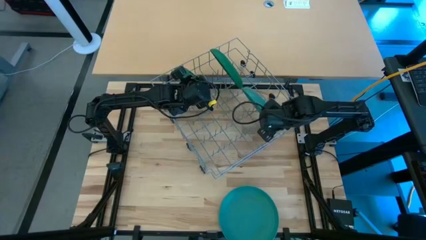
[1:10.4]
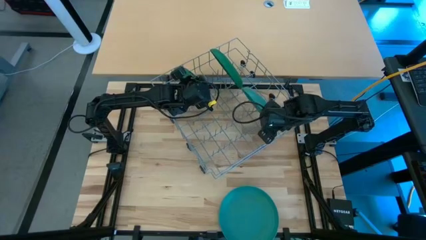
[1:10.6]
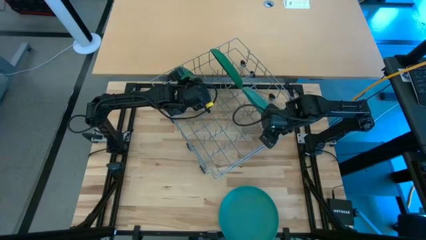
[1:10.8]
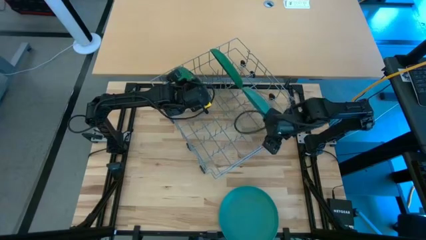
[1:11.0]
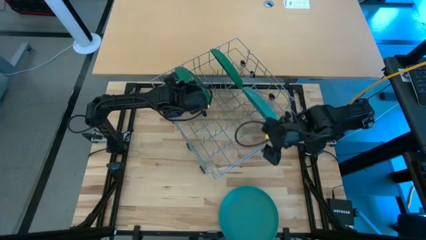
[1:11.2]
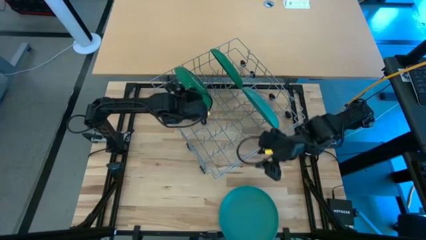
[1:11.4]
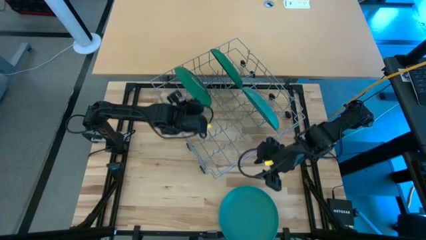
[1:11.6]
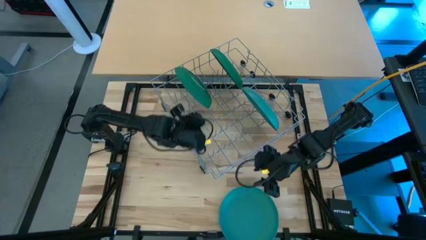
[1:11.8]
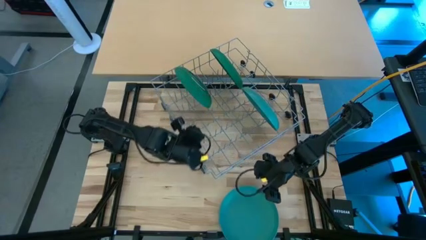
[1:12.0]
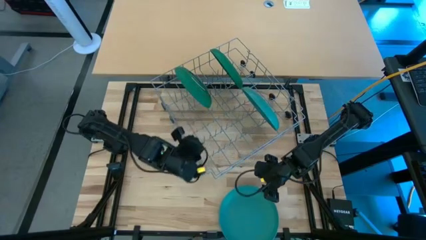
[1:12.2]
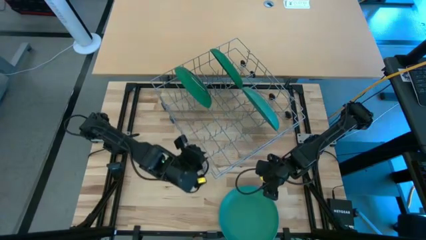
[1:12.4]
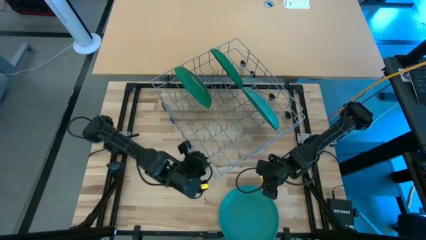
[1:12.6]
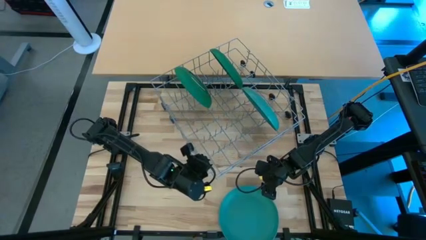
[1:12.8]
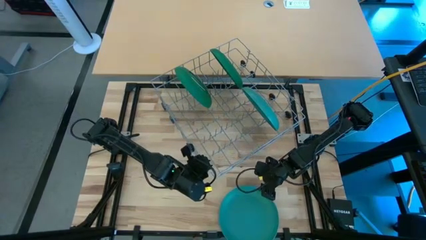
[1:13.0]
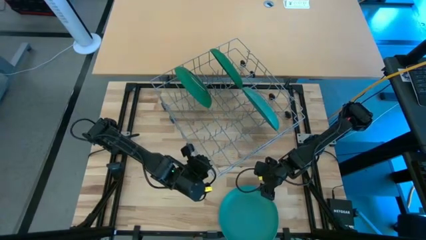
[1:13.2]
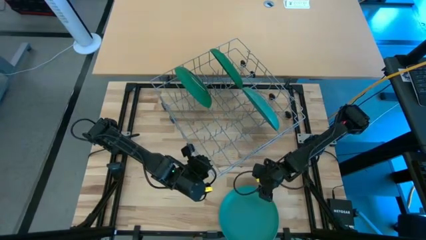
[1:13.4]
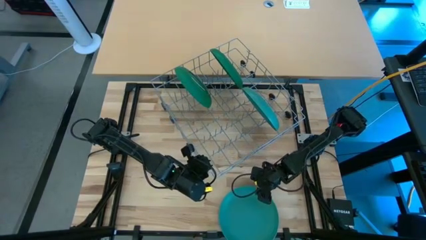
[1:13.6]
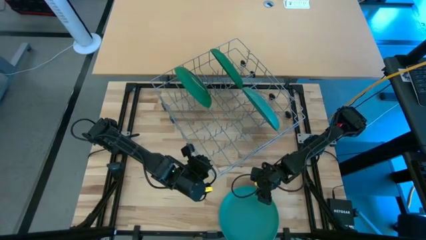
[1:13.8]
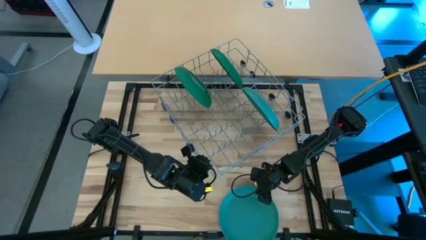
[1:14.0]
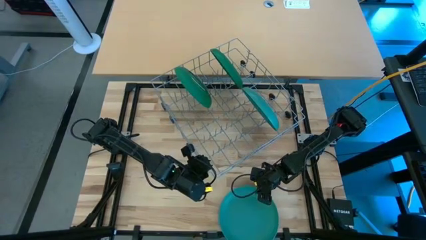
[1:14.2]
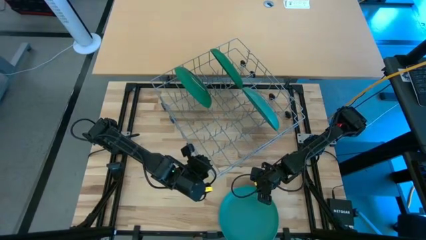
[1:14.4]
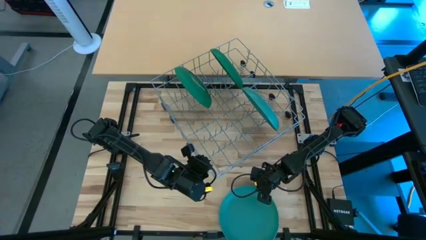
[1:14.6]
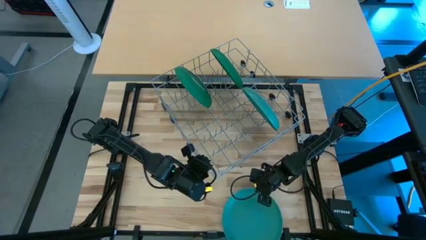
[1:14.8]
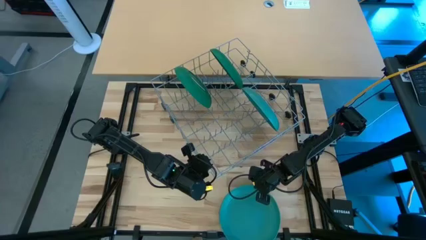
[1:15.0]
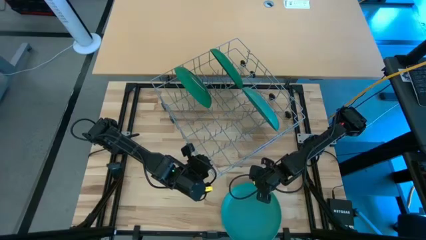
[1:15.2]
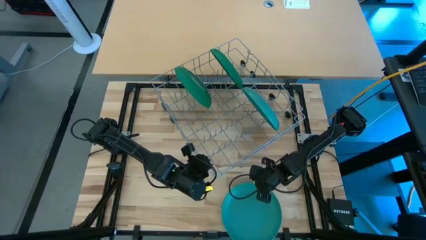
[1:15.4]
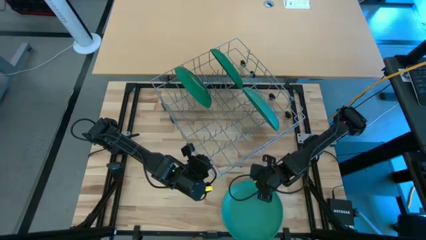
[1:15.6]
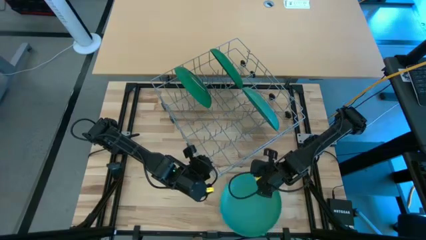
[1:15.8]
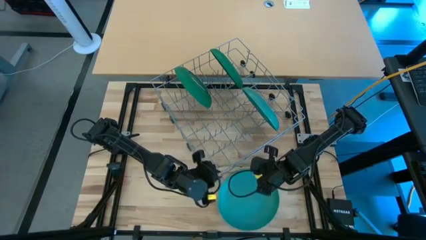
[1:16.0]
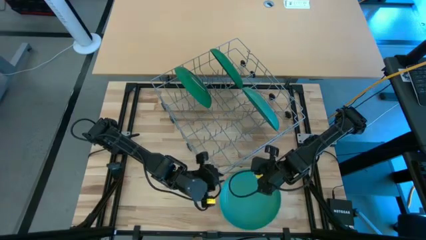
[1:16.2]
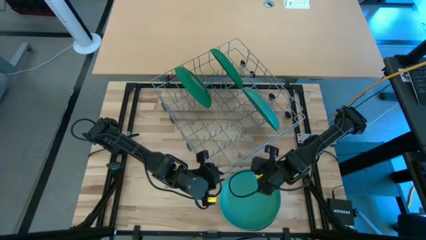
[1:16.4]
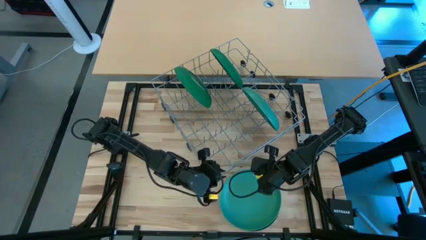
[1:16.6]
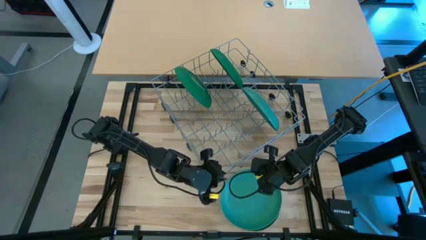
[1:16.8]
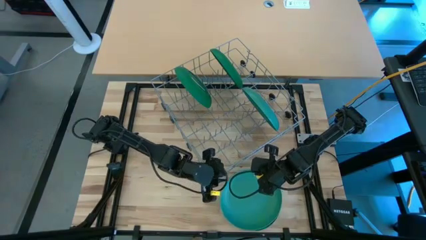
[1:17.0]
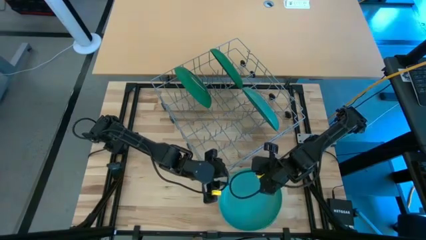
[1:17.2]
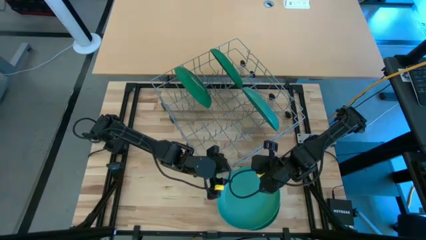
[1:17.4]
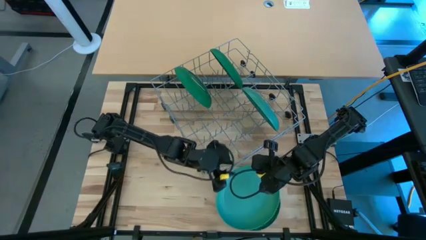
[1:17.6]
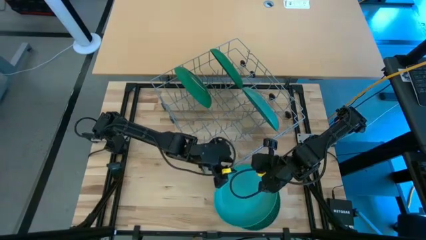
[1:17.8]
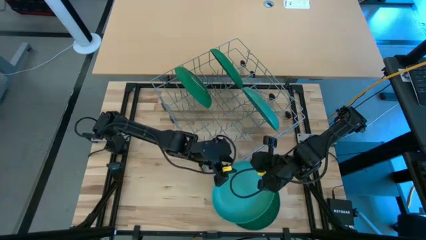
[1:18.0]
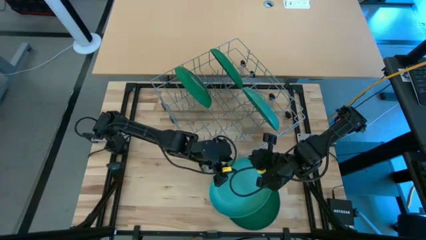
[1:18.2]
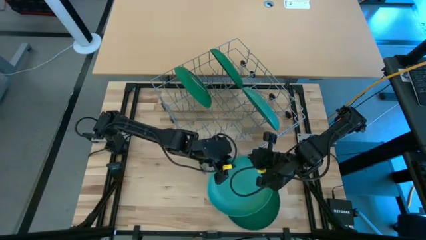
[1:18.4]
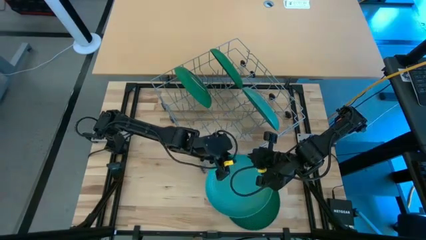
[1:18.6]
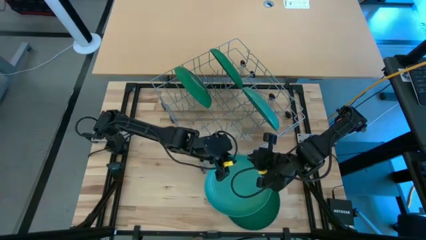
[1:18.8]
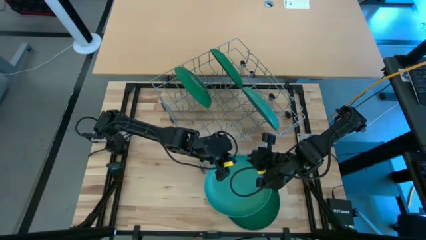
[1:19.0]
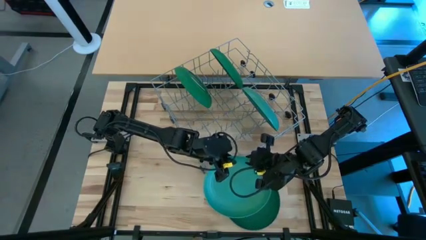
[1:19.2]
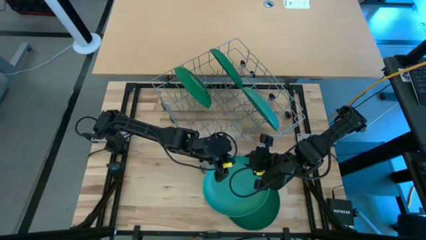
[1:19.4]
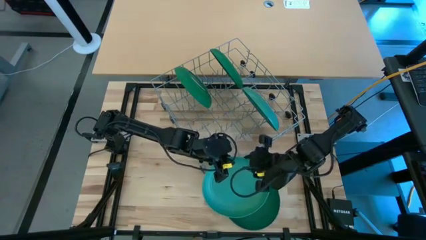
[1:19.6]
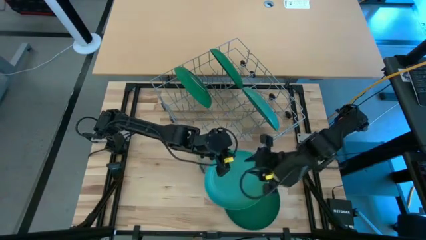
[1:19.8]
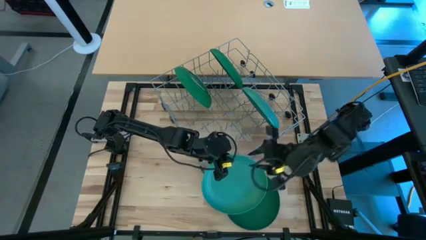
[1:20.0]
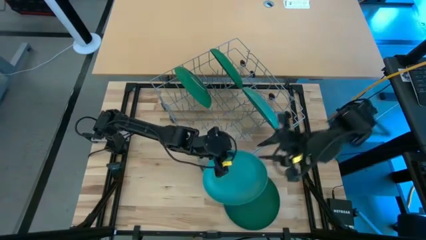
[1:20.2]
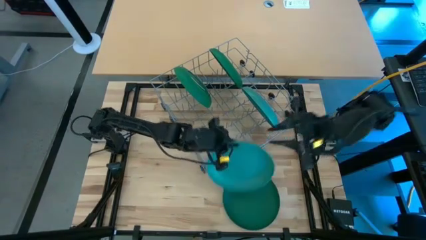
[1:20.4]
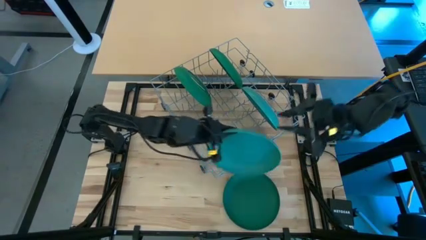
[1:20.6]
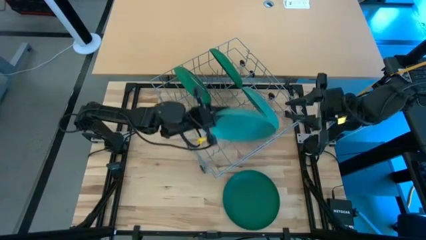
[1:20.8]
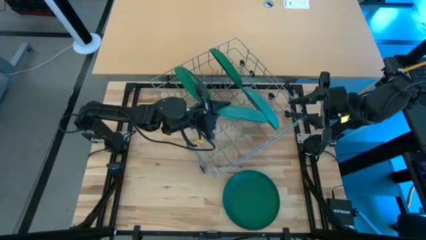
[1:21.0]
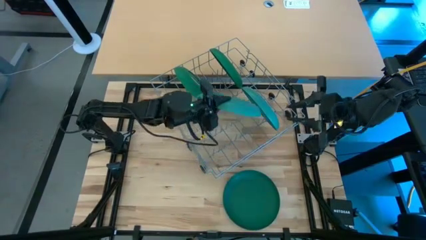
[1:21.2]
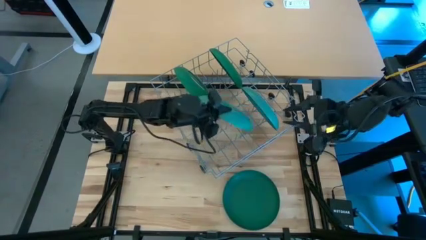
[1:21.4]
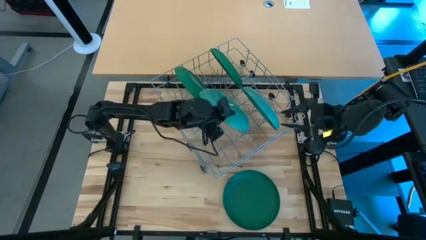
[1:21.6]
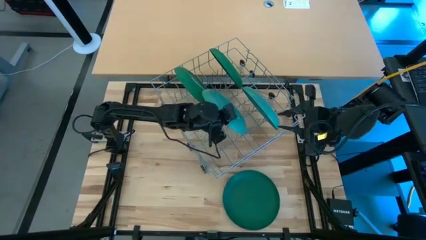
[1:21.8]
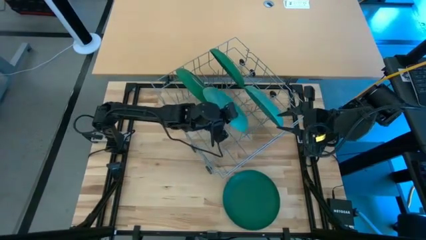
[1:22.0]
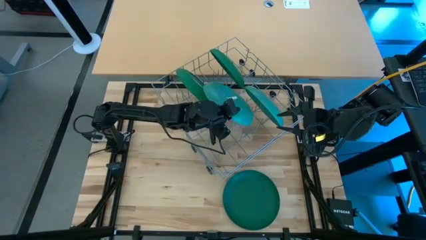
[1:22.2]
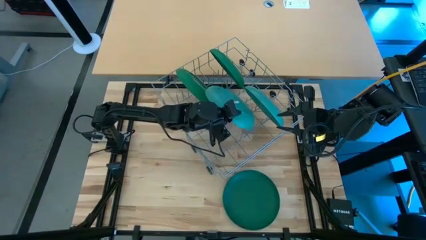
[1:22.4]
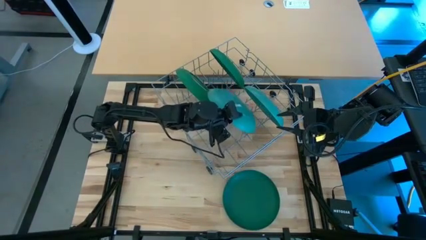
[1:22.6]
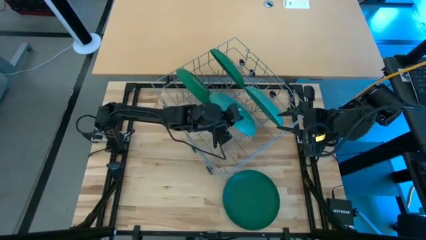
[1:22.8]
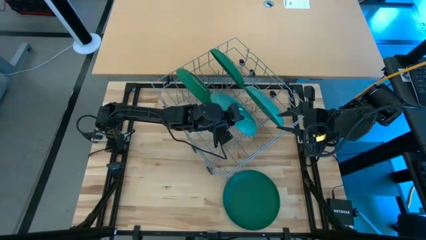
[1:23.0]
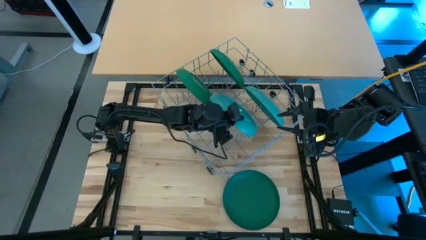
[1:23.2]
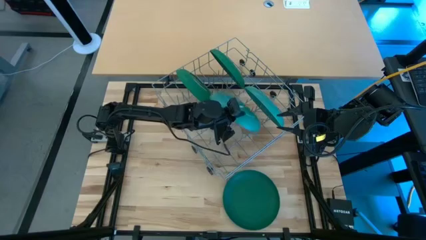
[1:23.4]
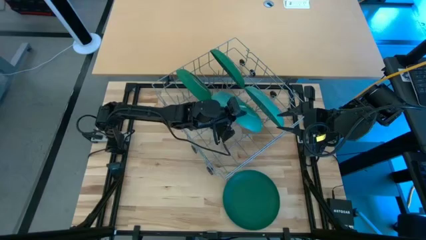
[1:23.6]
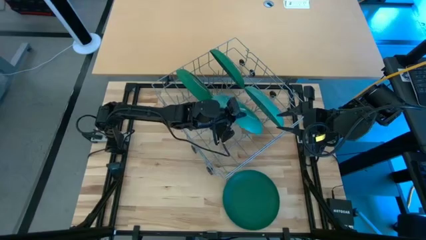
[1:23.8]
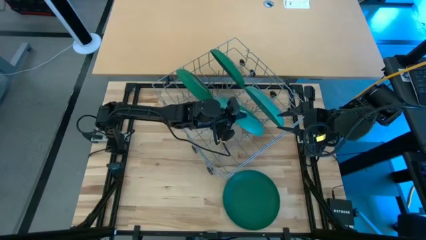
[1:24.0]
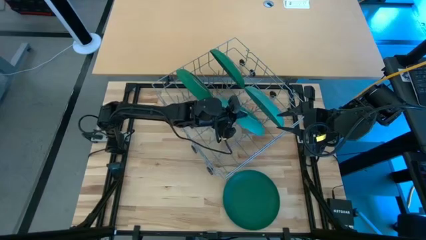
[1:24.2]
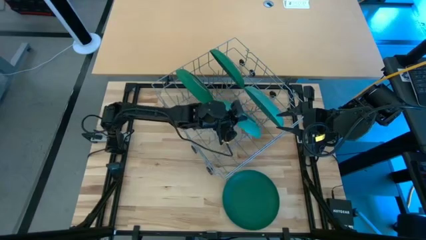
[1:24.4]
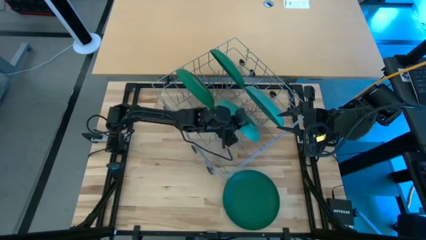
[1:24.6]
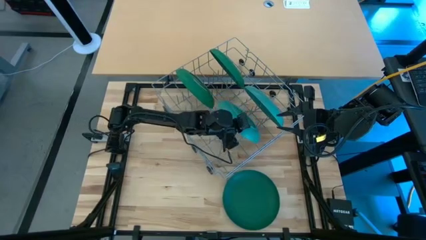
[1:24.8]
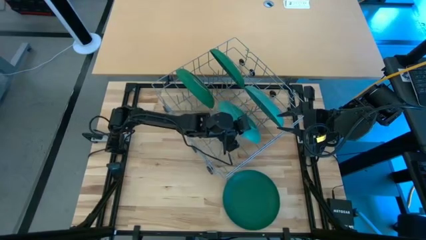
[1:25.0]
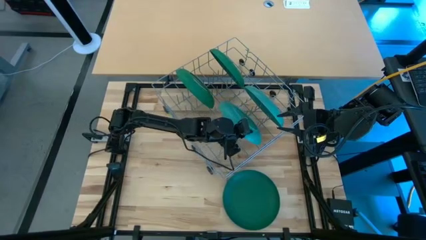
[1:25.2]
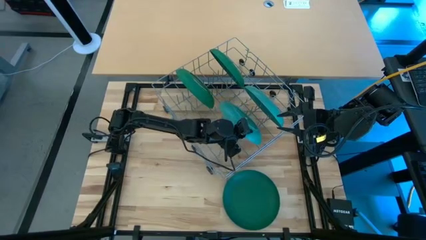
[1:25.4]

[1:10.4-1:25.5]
Task: Sort dishes
Put the blue plate into the dish rack

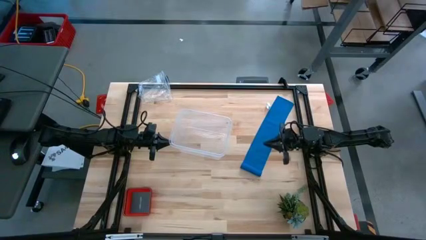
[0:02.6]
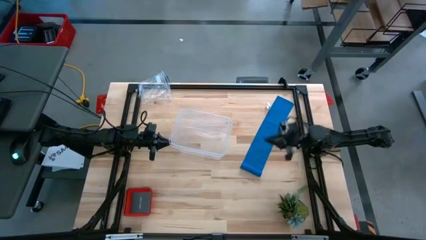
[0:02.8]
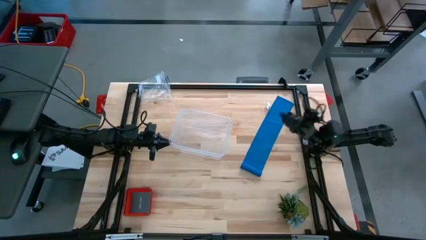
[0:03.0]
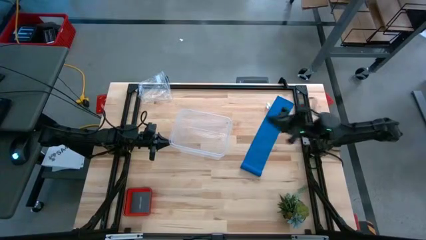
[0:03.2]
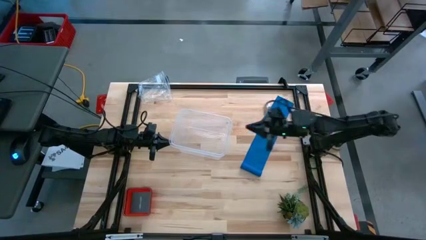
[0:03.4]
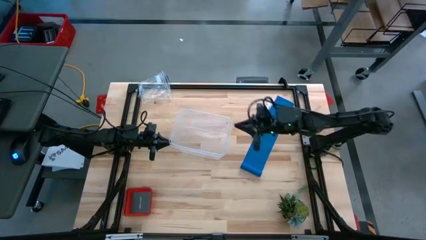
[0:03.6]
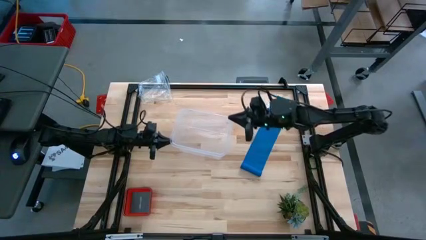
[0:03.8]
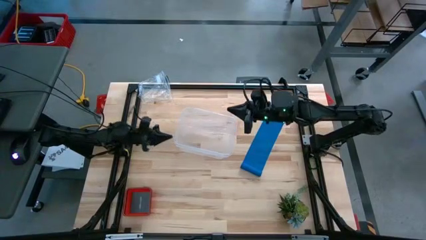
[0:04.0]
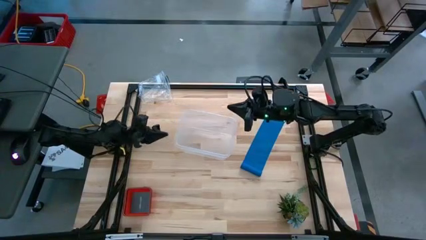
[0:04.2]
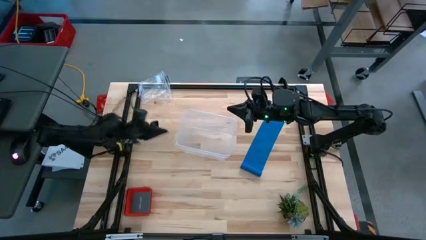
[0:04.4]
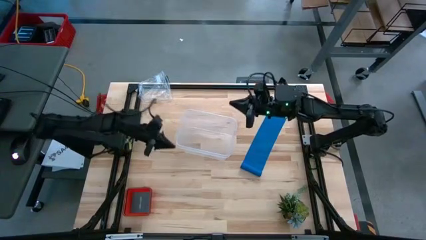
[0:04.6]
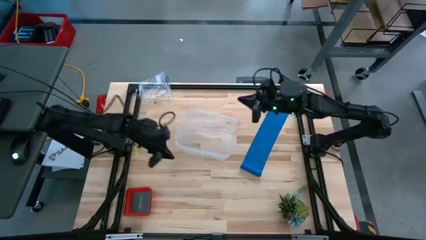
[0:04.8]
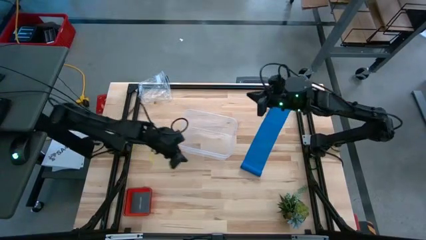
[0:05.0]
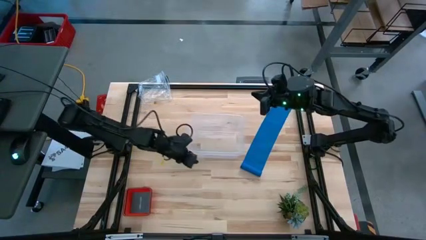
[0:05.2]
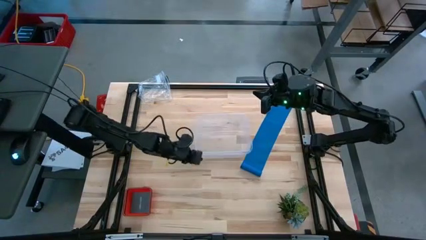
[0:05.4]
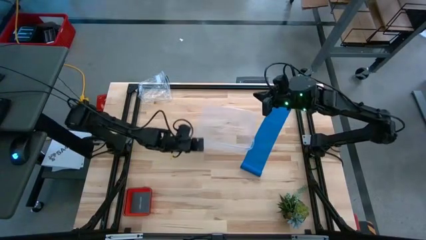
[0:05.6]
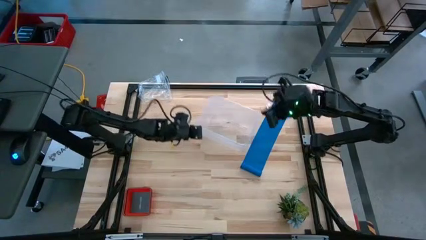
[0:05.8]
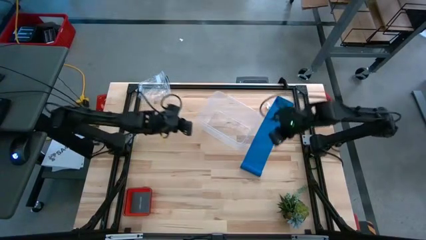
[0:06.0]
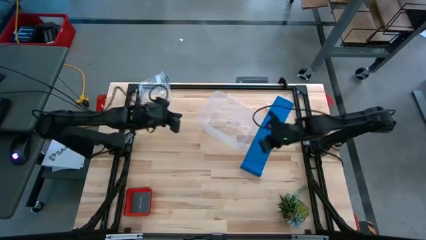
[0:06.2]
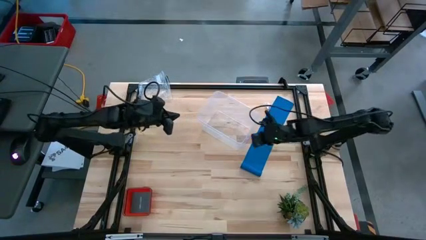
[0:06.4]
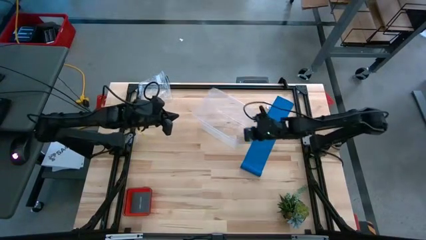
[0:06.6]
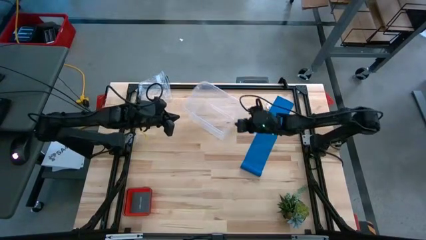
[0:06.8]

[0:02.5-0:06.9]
Task: Roll bandage
Move the transparent container to the top center
